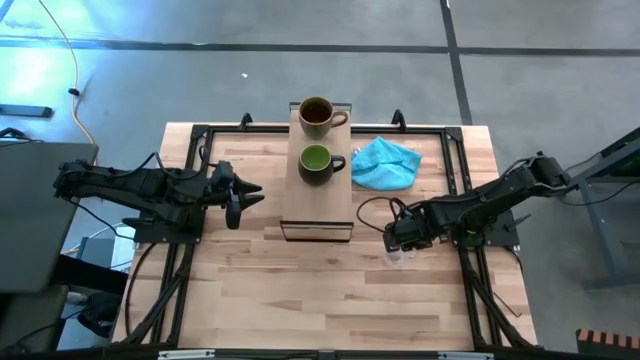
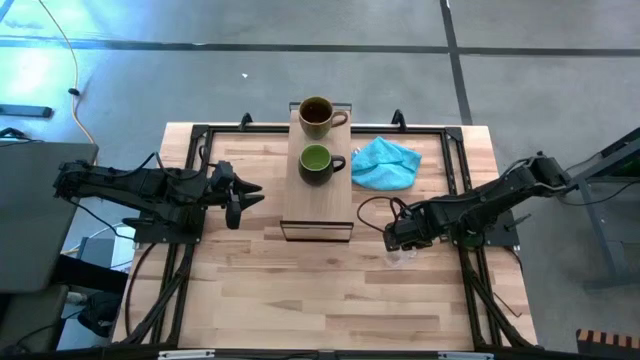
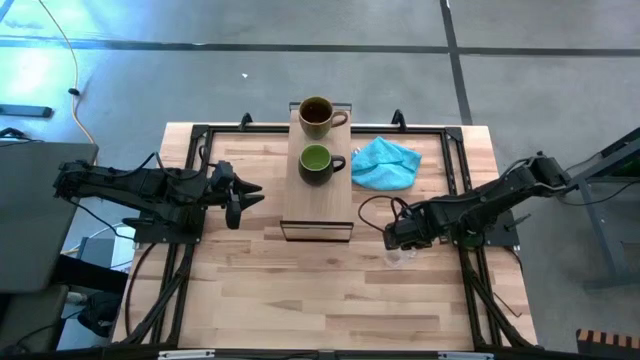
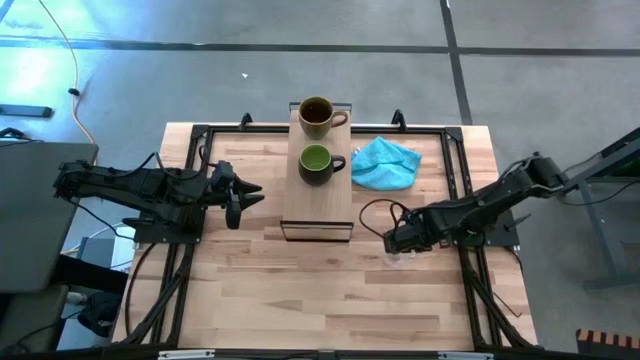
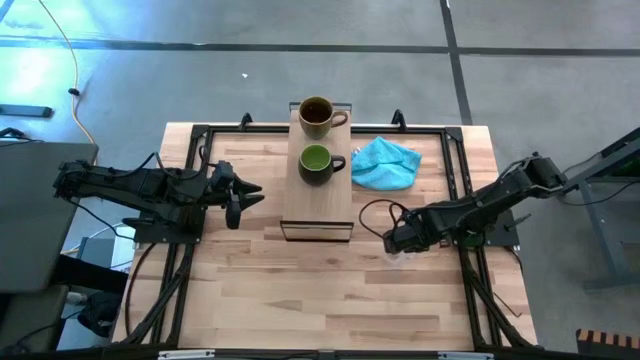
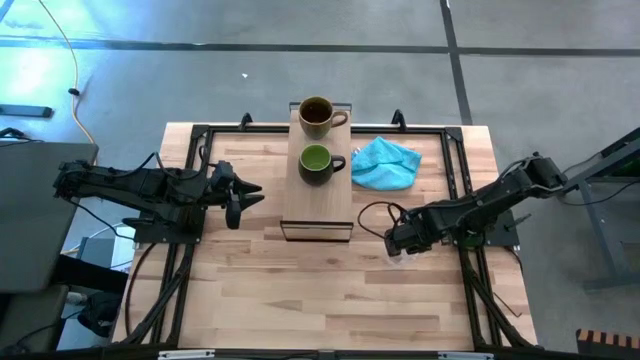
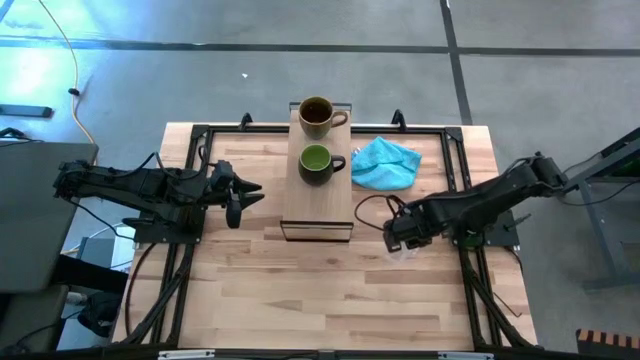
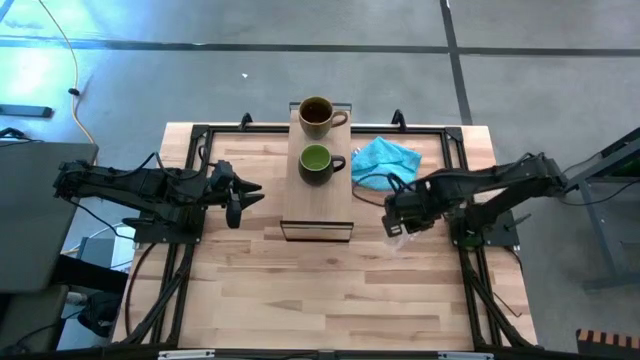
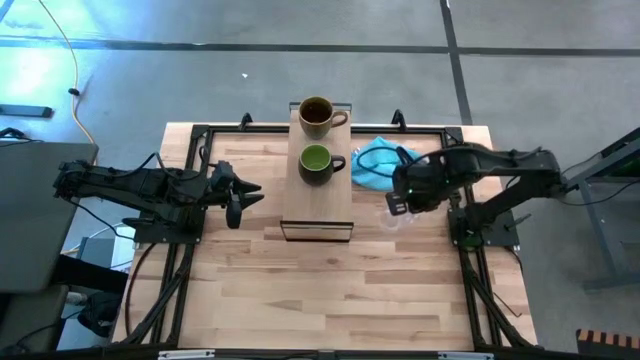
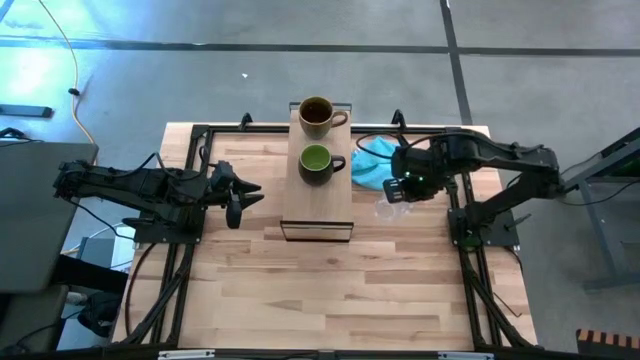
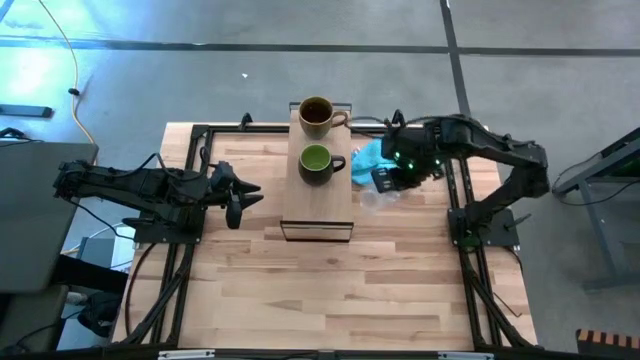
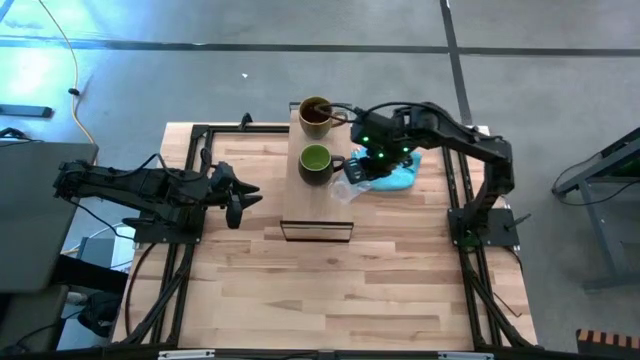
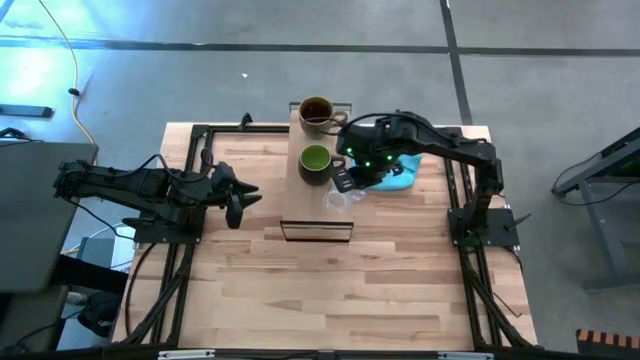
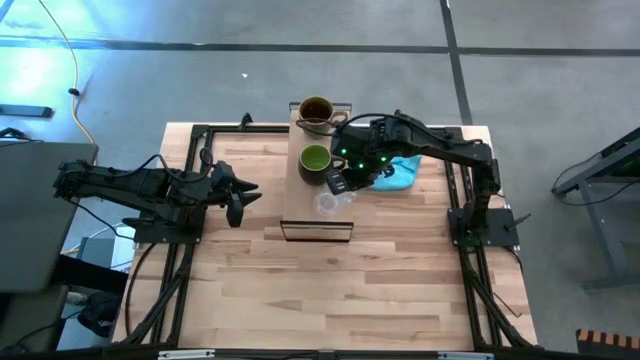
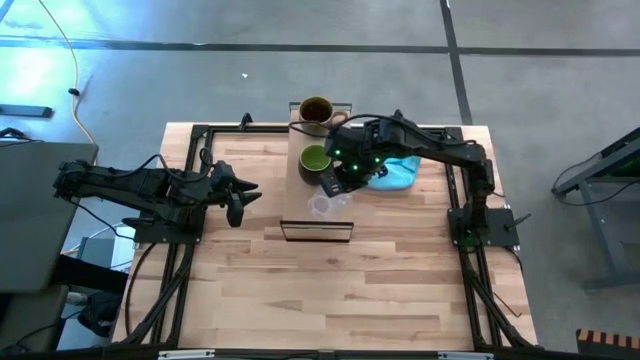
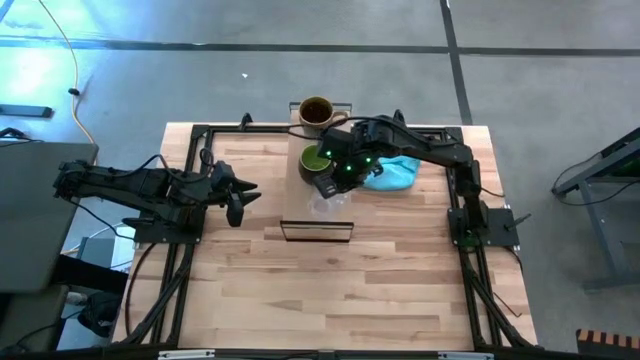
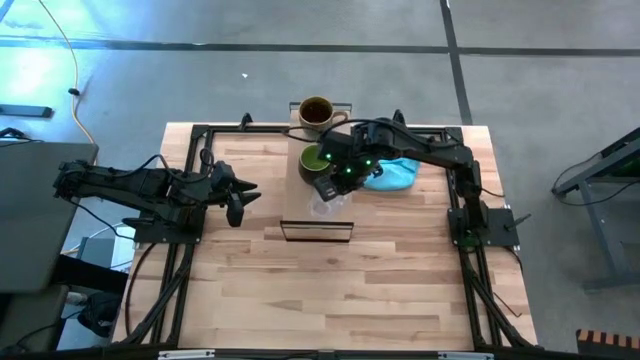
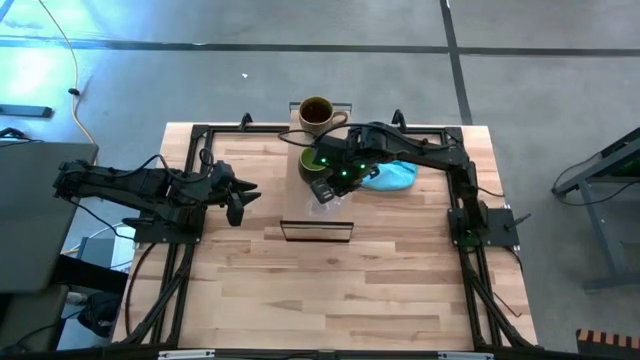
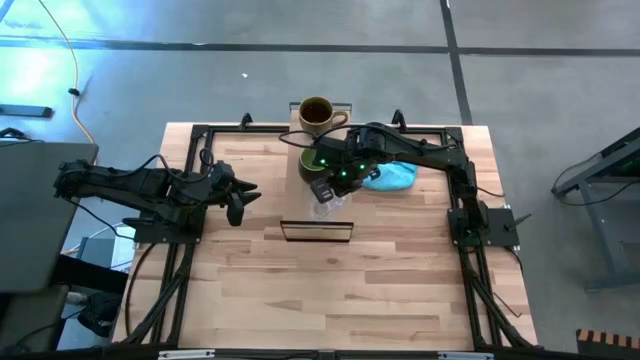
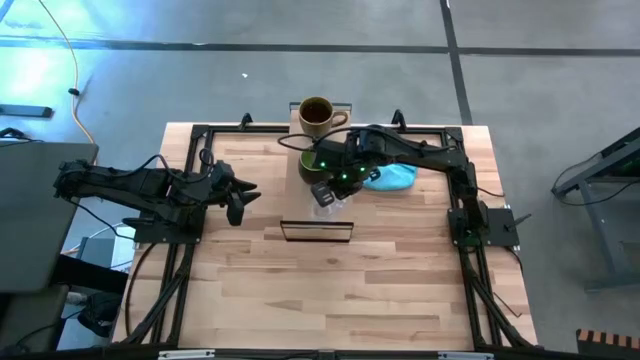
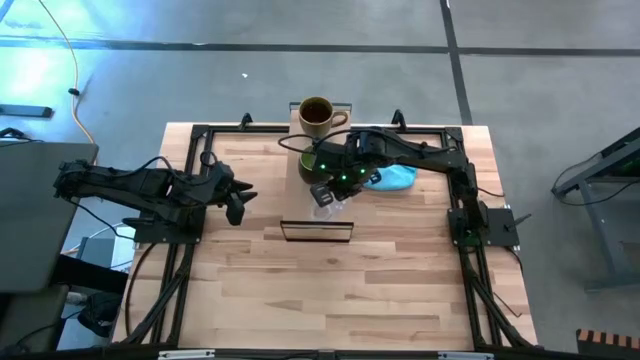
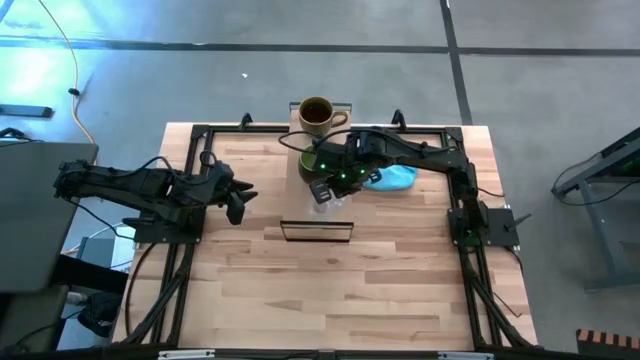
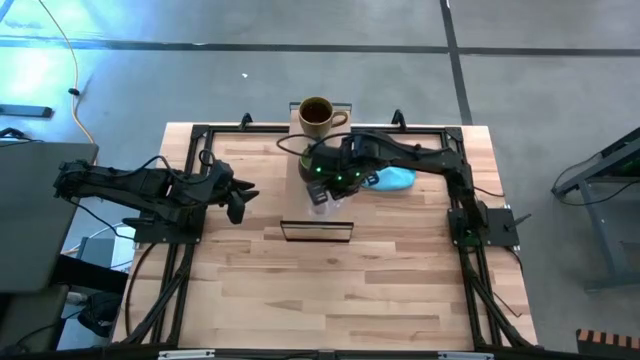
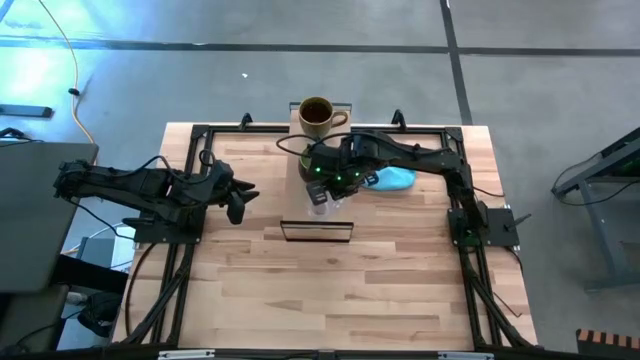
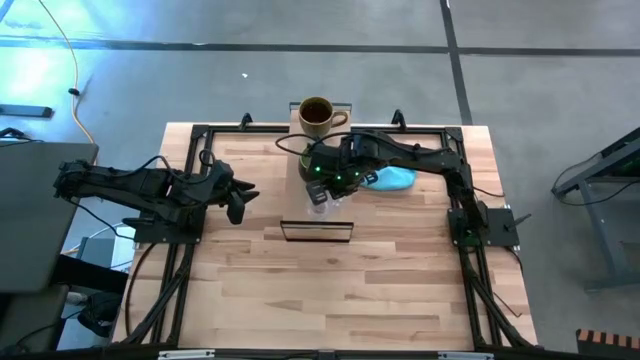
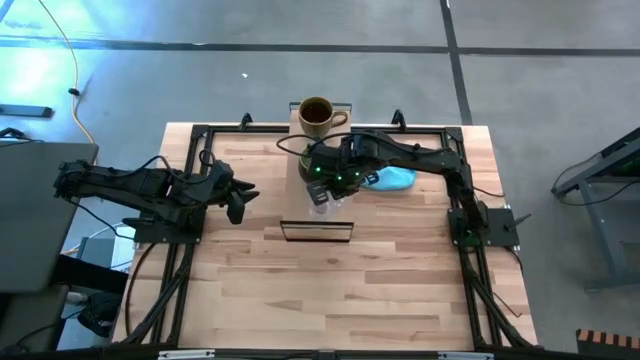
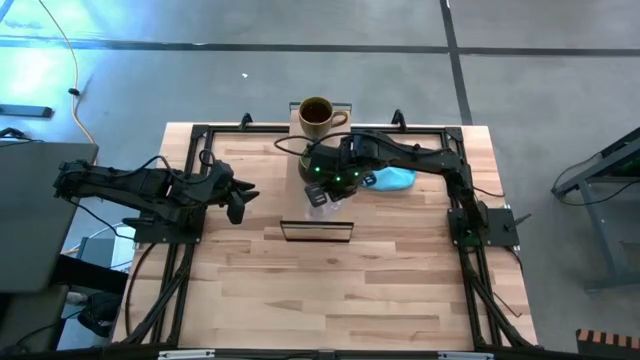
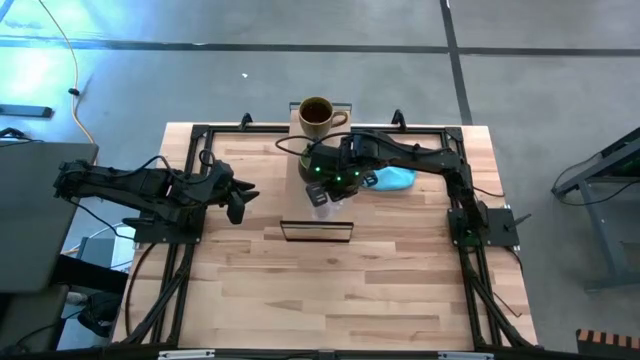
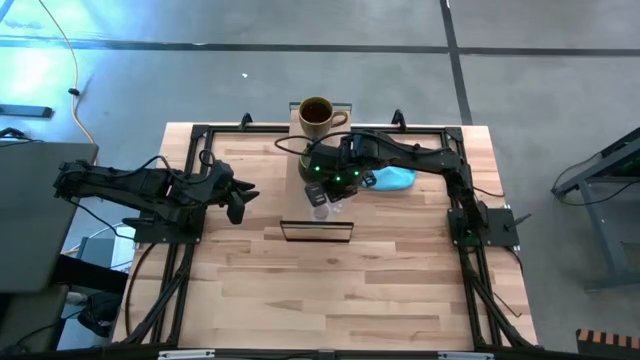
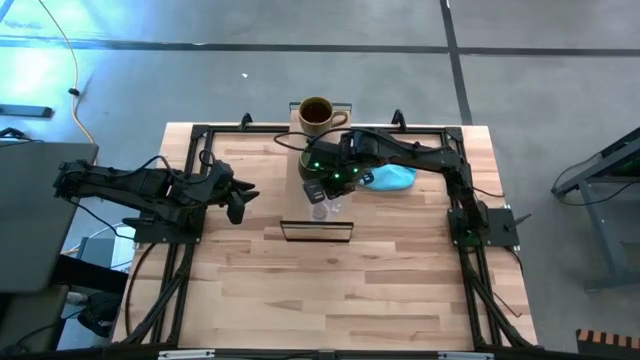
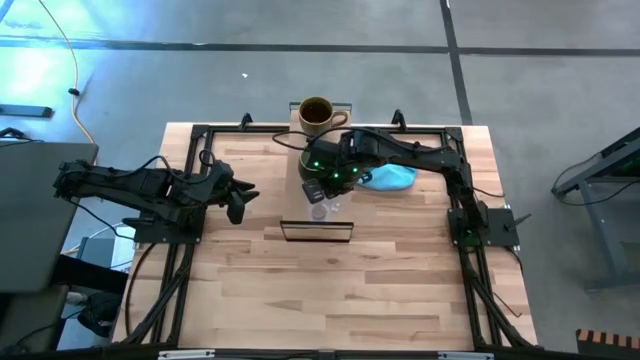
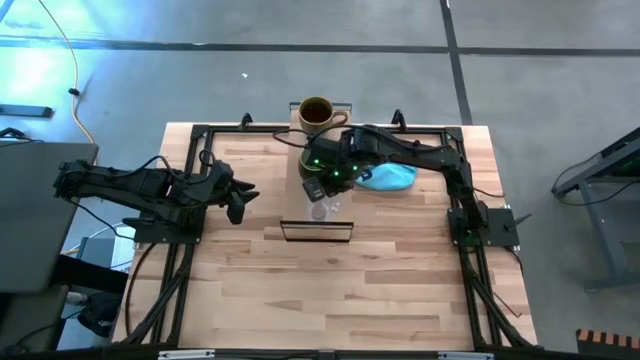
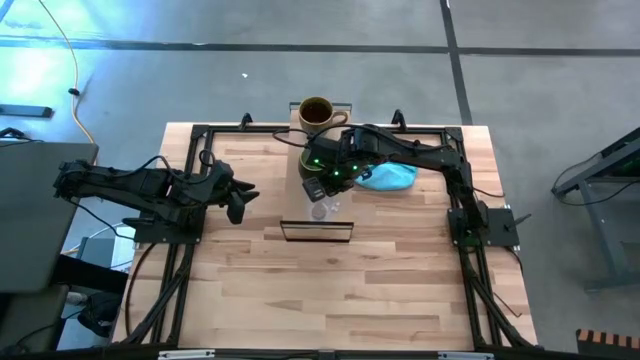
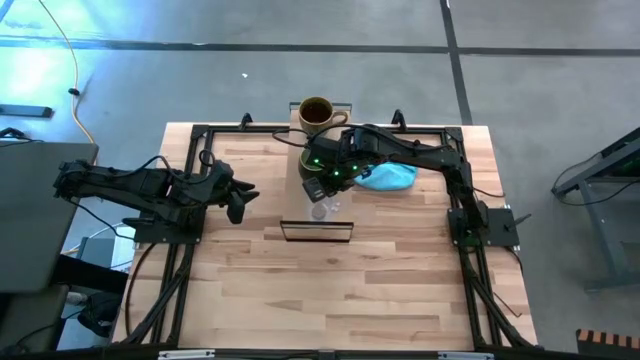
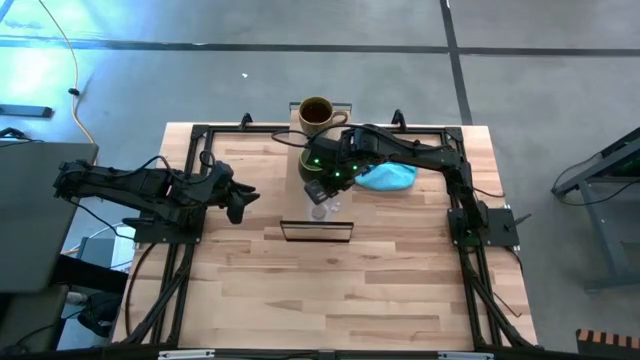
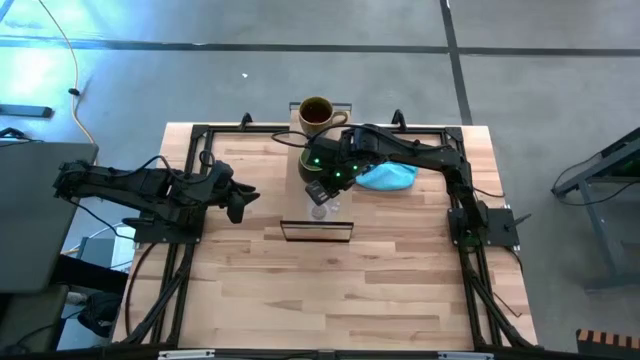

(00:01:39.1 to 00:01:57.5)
Task: Stack small to large cups/mugs on shelf
Put the transparent mug on the shelf

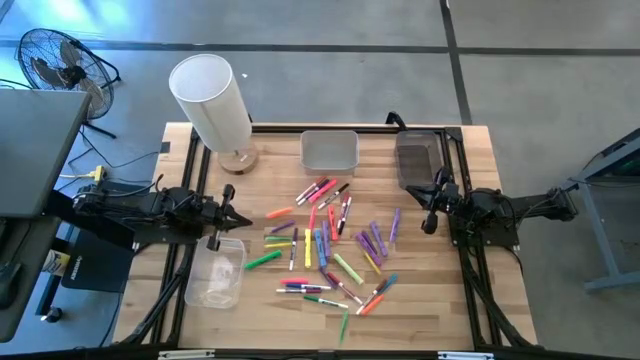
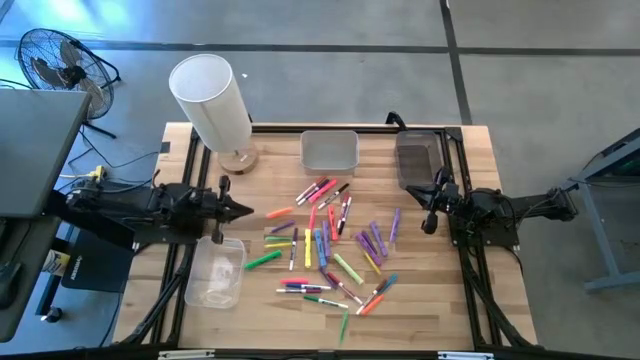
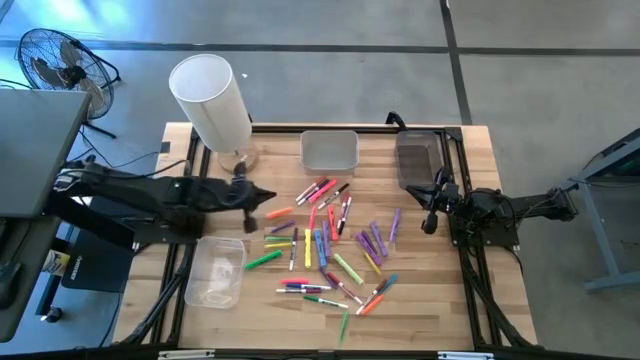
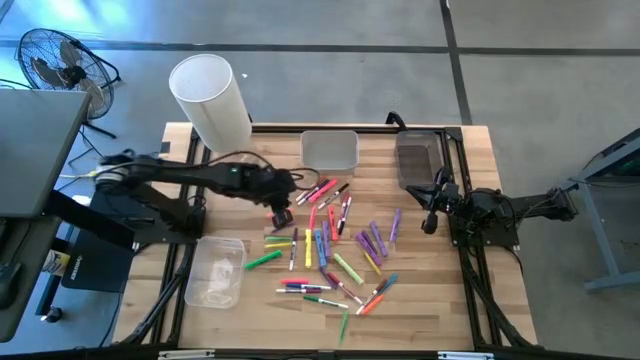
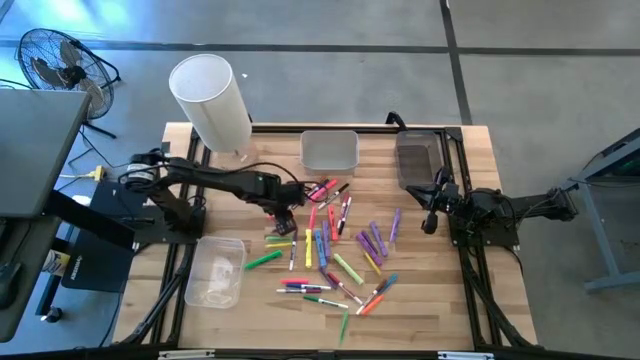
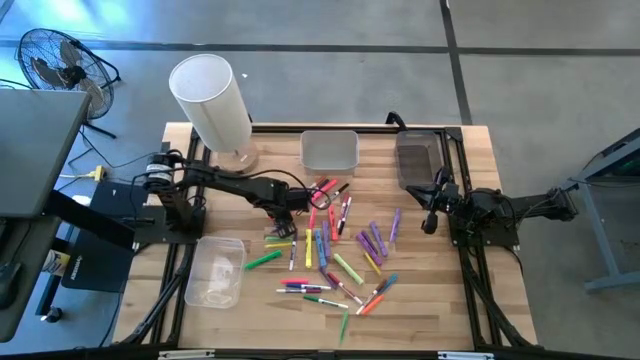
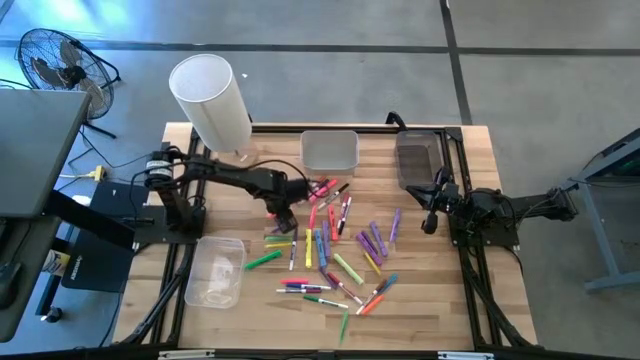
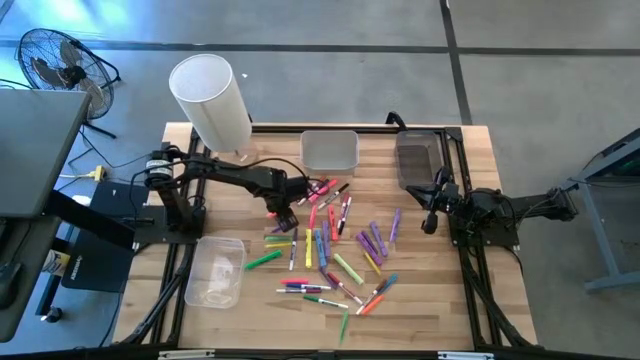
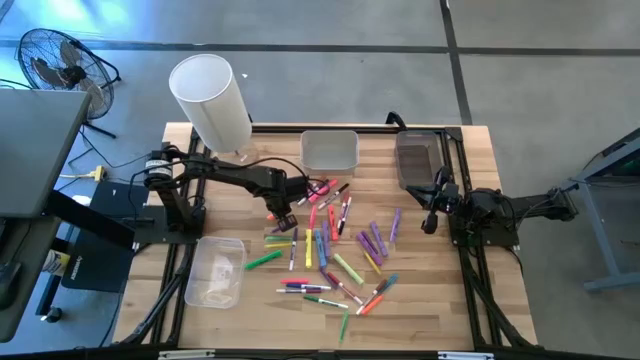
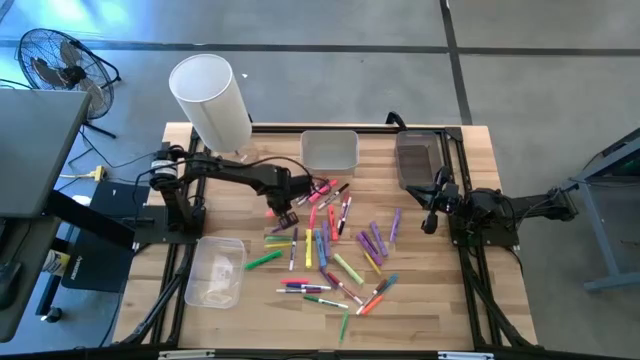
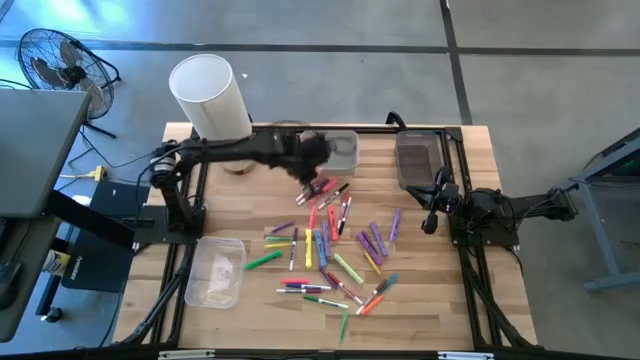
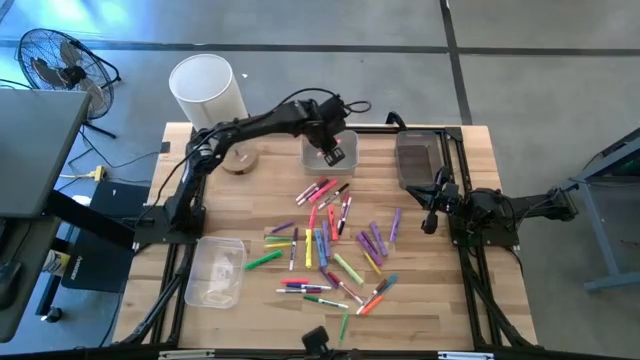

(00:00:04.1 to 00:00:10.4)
Task: Pick & Place Markers
Put the orange pen into the white bin
